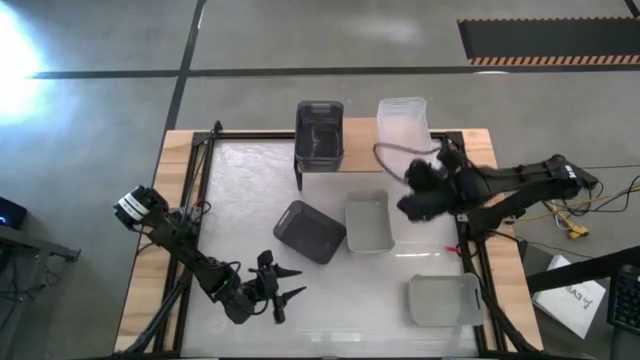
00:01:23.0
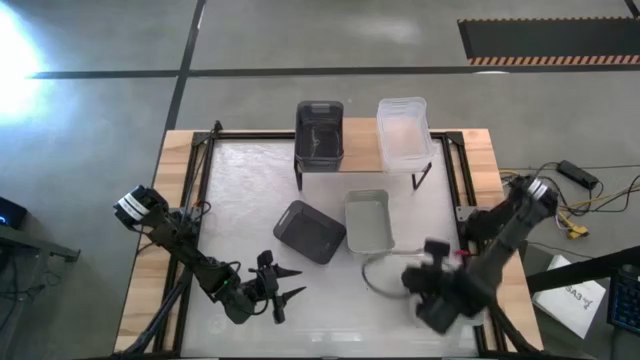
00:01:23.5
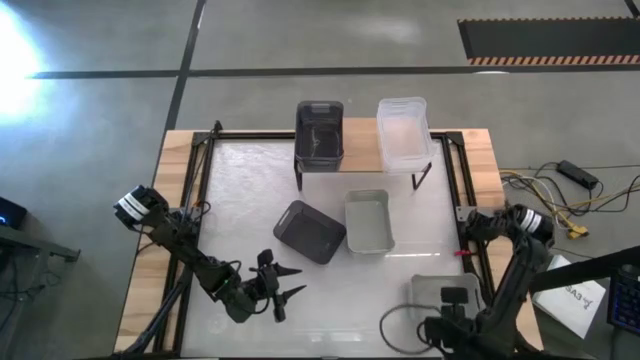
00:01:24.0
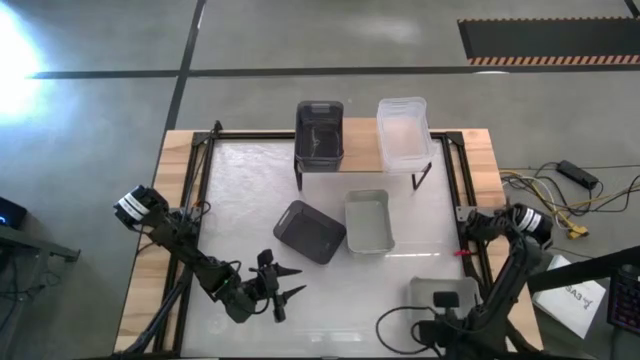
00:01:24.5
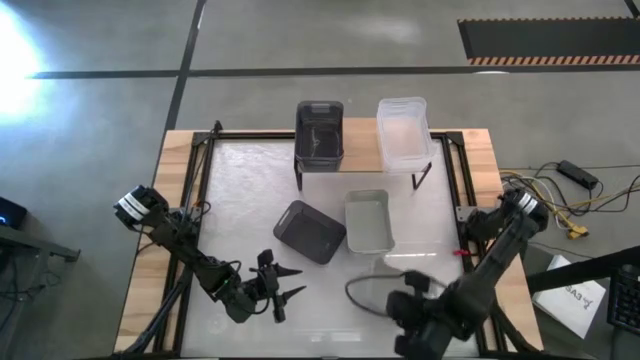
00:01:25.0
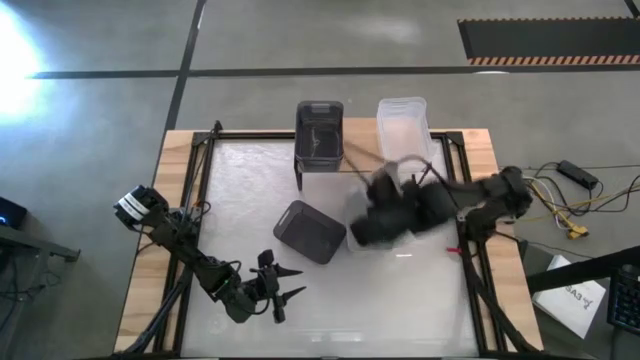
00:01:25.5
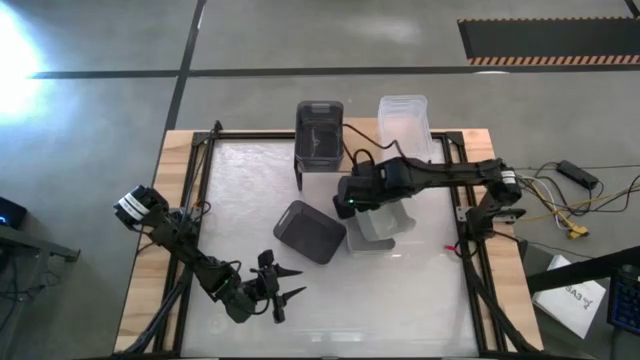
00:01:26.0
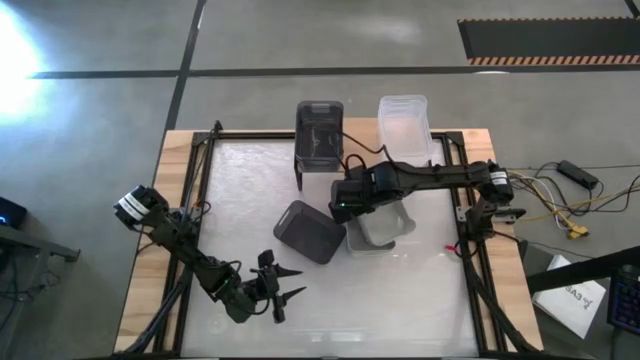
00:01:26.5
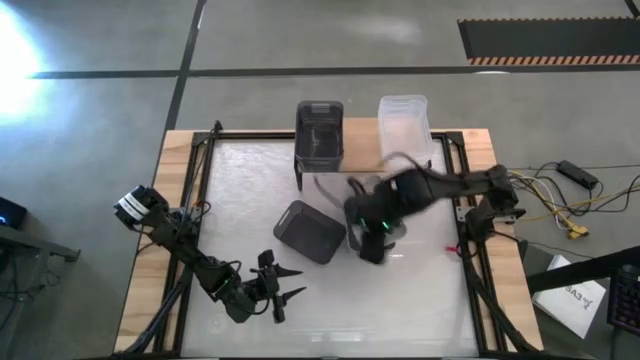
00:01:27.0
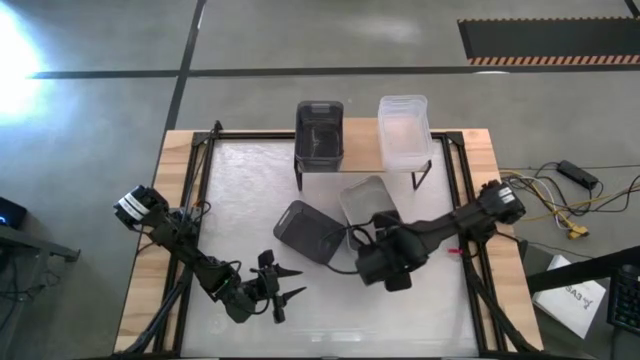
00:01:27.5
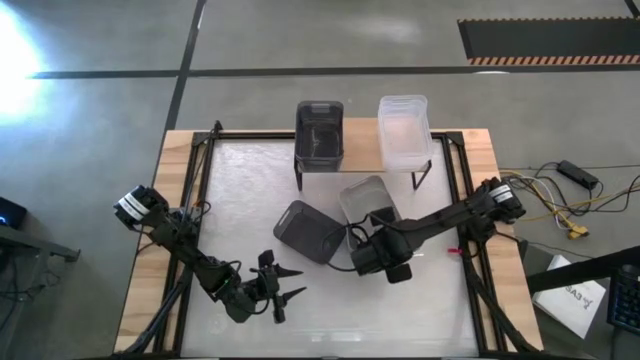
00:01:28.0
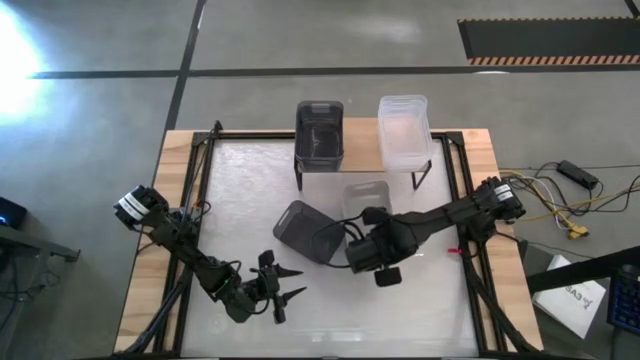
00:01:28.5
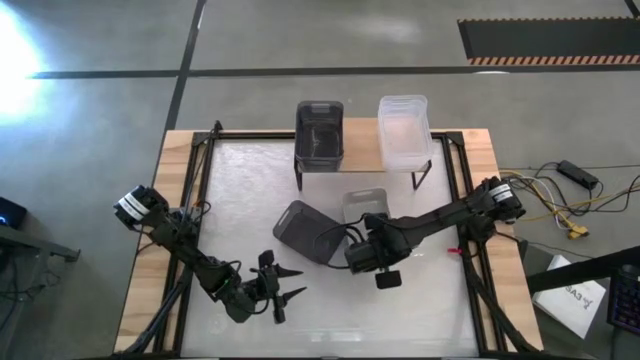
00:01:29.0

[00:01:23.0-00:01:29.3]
Task: Stack baskets on shelf by color
Stack the bottom gray bin on top of the top gray bins

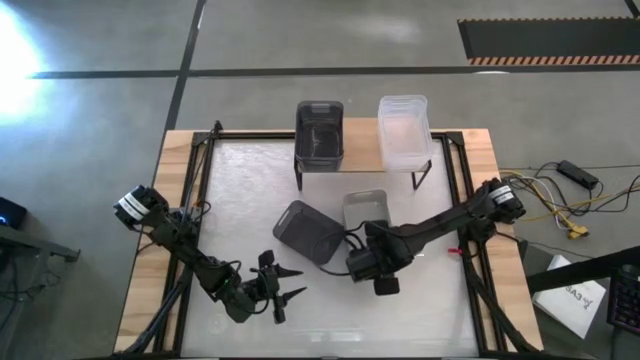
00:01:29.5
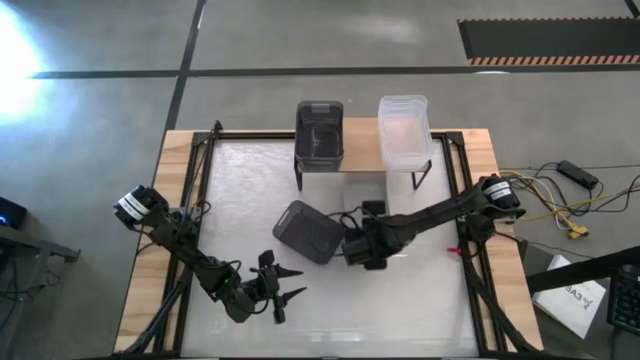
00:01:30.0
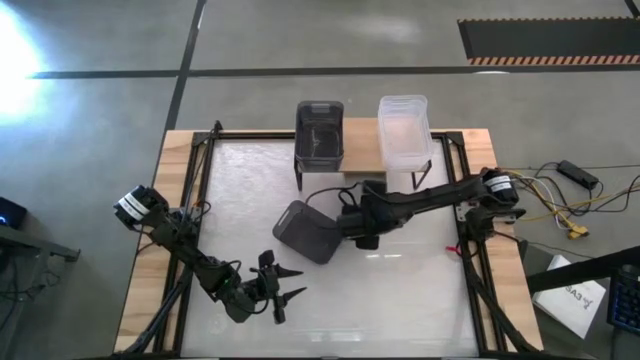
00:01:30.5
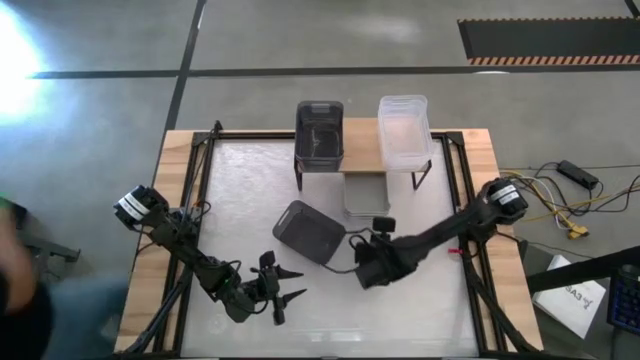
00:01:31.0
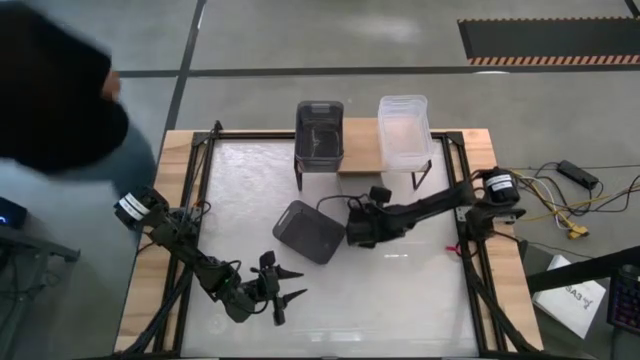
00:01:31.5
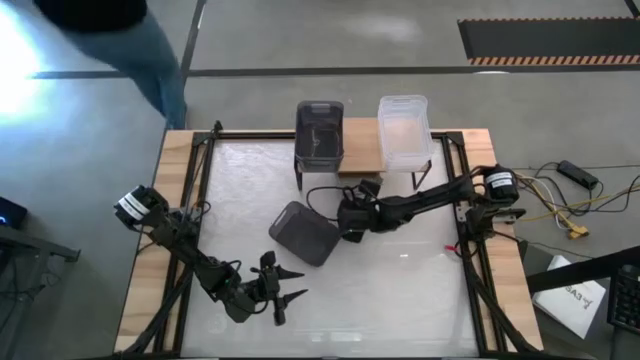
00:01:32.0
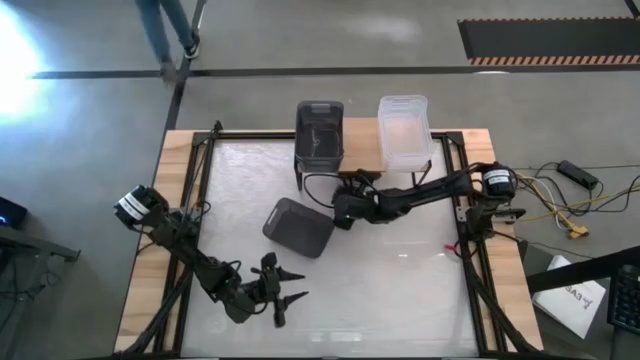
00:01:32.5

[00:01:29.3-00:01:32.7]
Move the stacked gray bins under the shelf

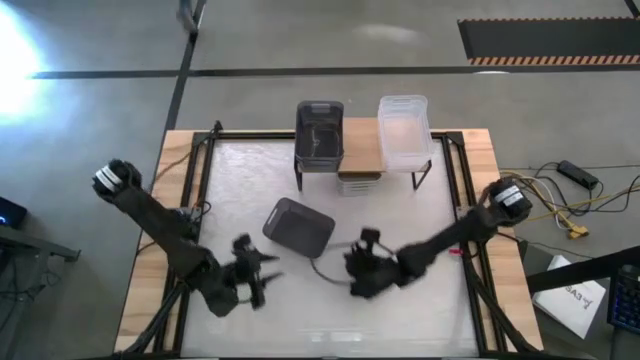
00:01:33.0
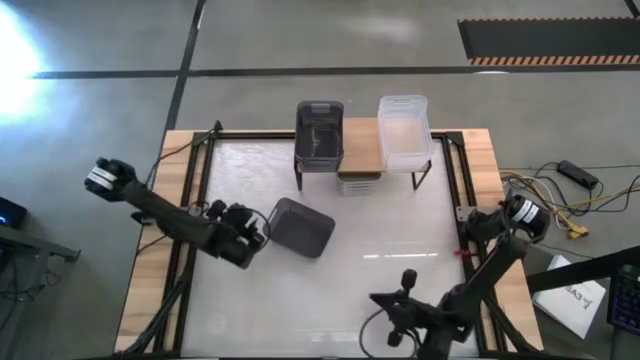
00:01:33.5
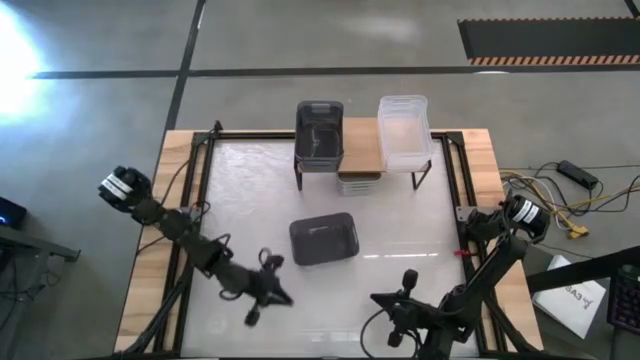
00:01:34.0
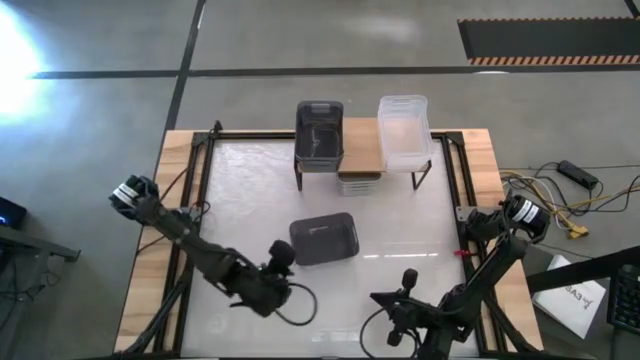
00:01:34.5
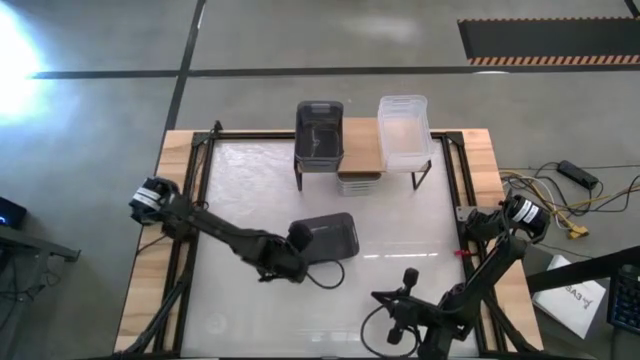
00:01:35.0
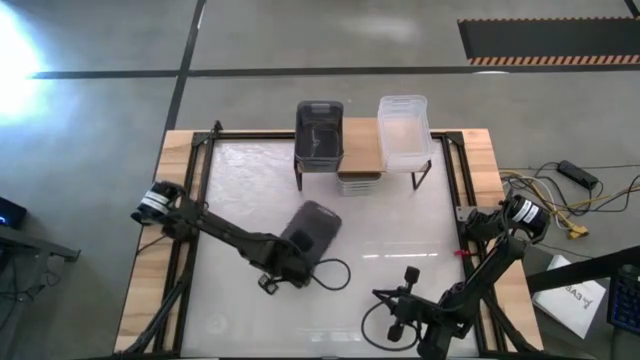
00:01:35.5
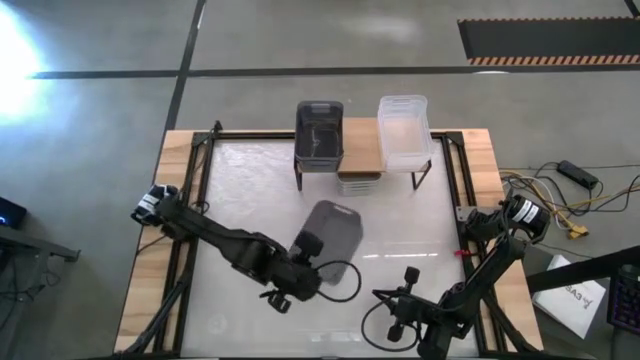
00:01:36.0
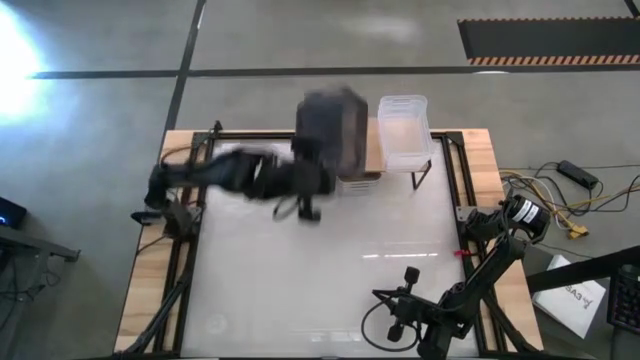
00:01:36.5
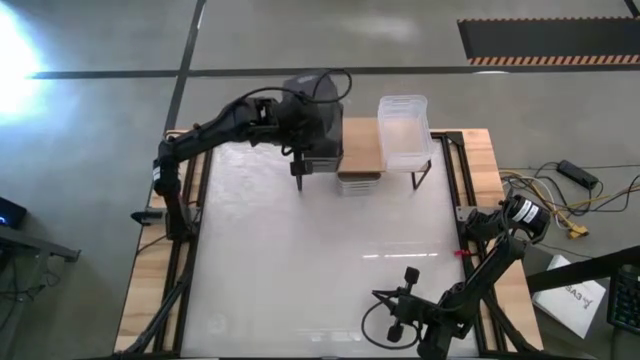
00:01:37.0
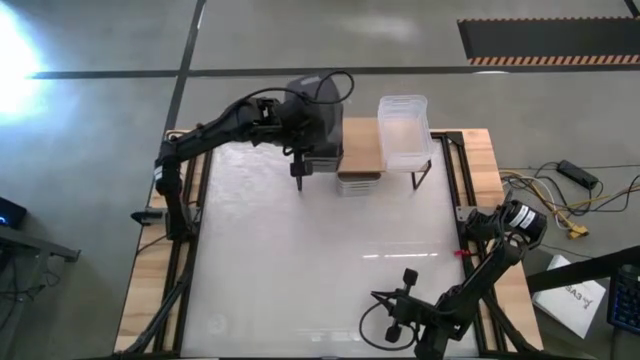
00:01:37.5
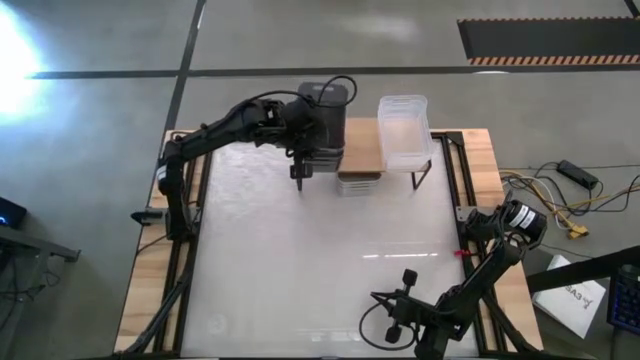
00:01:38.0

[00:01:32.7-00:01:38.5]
Stack the black bin on top of the black bins on the shelf

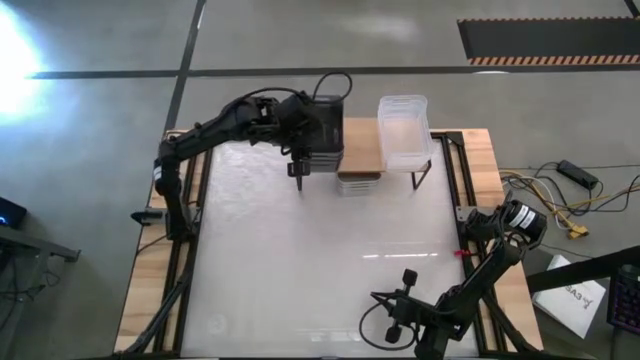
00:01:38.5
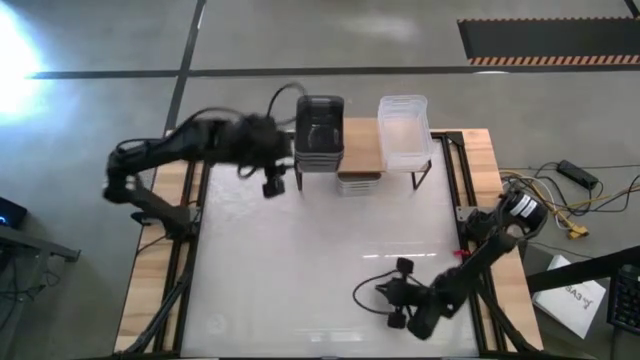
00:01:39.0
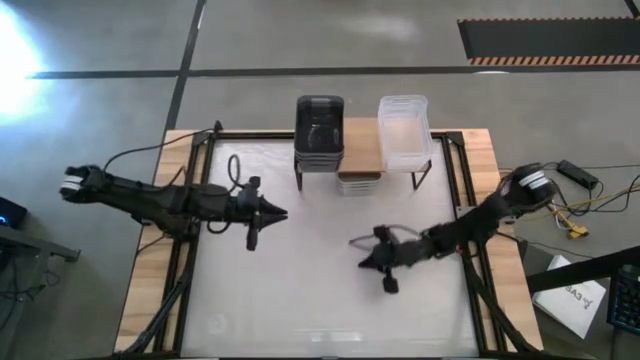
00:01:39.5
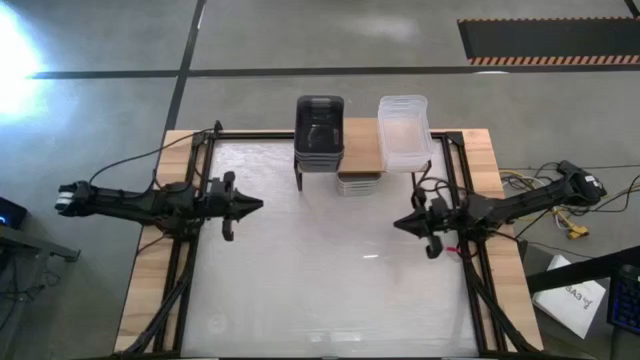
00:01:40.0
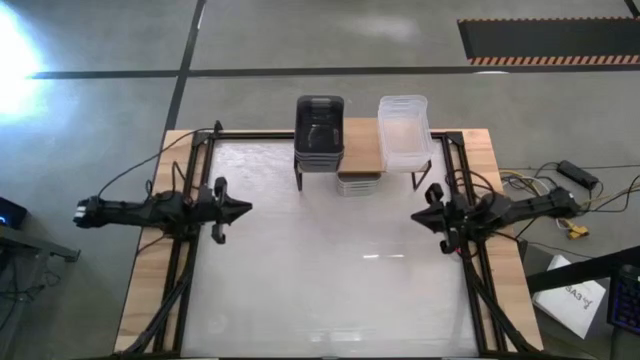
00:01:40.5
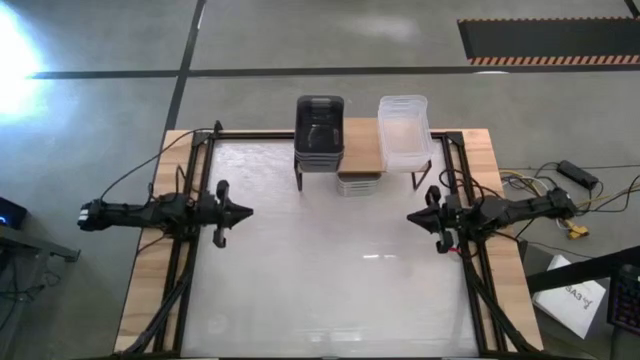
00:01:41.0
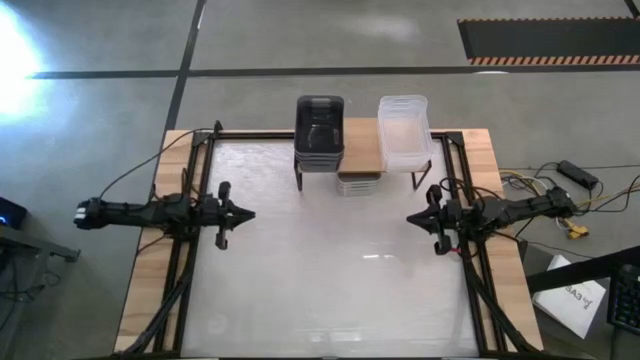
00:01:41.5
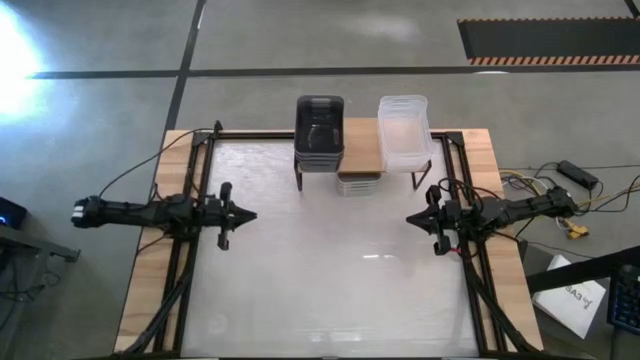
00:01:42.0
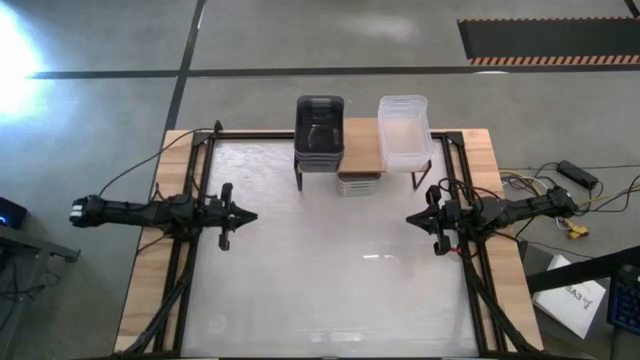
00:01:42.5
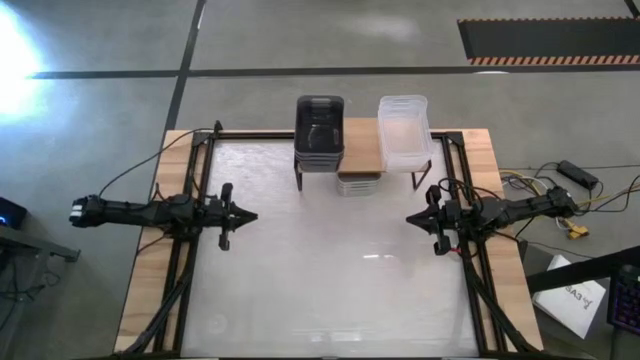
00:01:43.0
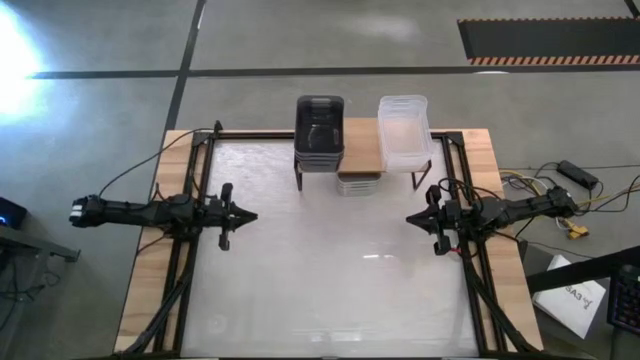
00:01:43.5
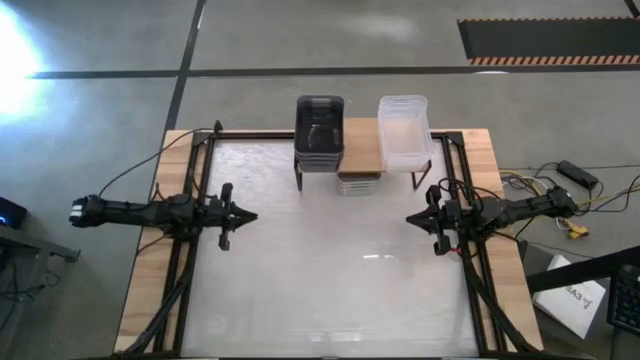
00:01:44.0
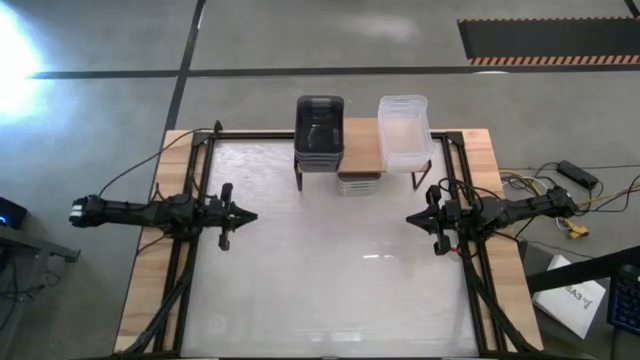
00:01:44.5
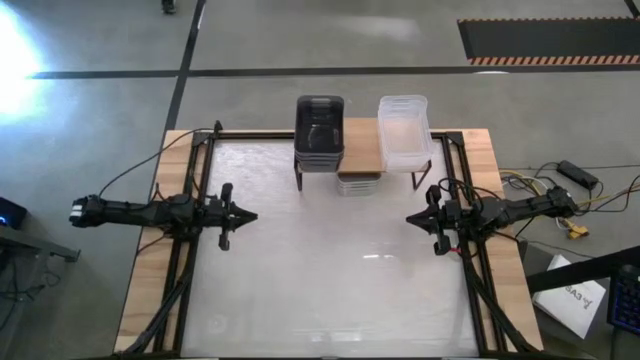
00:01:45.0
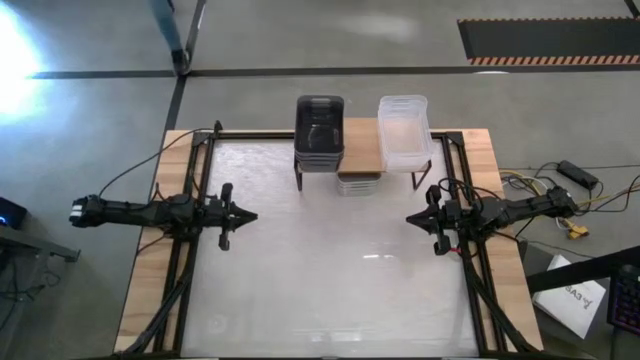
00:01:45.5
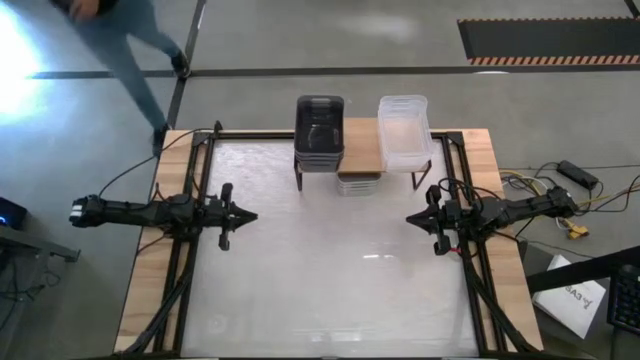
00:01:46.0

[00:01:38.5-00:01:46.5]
Return to Home Position
